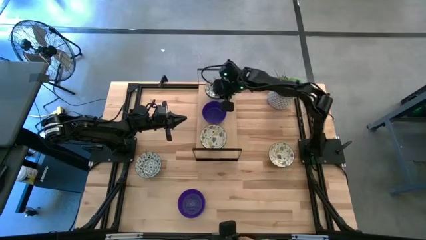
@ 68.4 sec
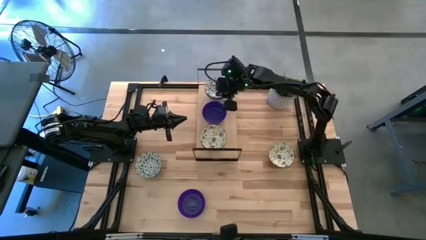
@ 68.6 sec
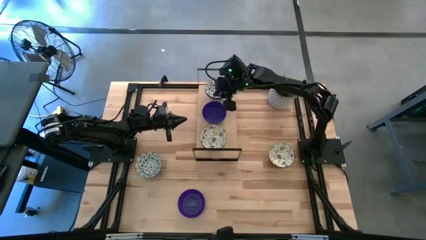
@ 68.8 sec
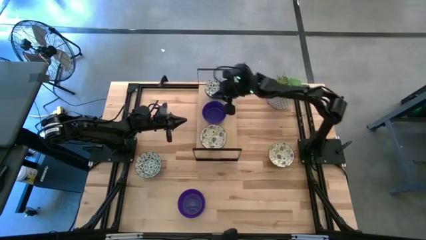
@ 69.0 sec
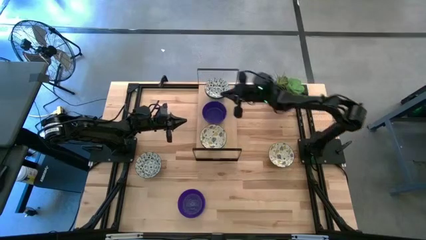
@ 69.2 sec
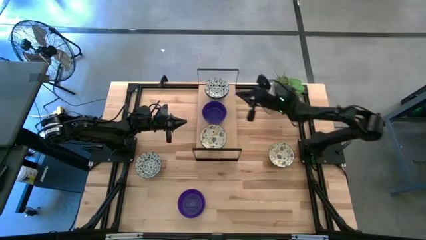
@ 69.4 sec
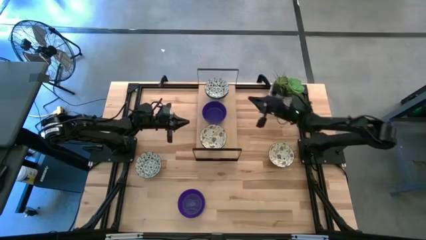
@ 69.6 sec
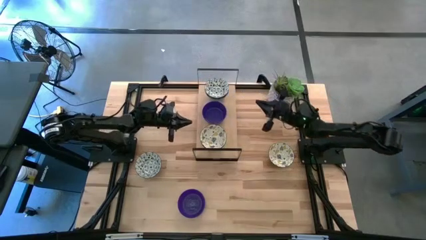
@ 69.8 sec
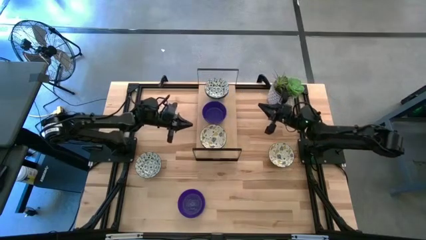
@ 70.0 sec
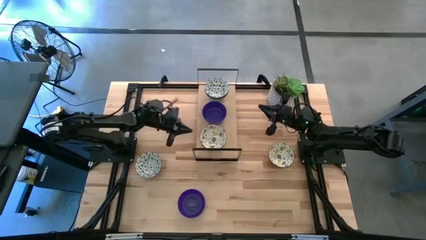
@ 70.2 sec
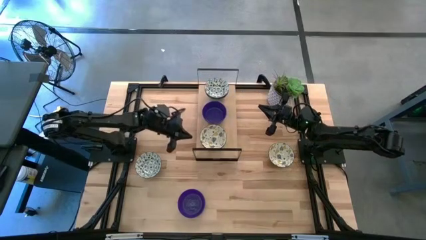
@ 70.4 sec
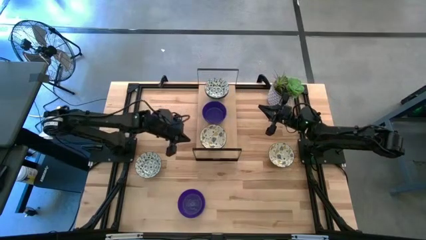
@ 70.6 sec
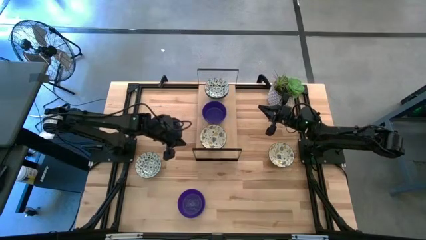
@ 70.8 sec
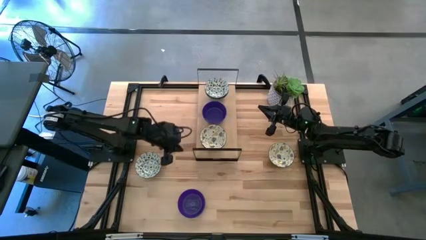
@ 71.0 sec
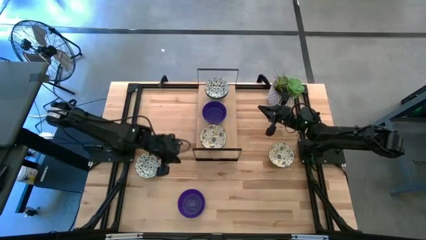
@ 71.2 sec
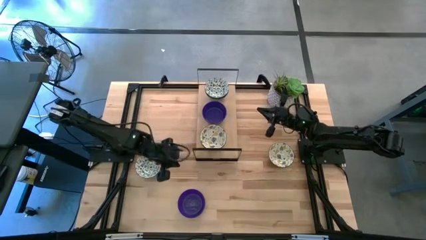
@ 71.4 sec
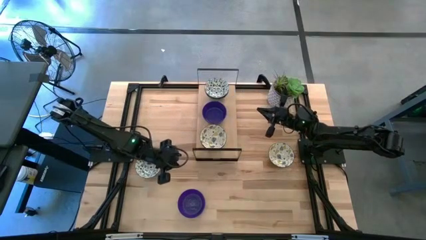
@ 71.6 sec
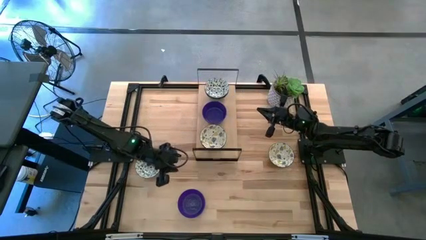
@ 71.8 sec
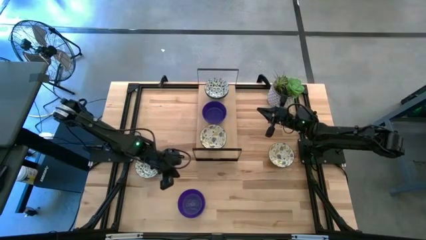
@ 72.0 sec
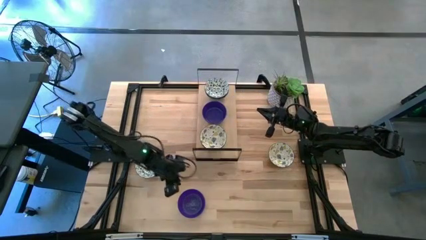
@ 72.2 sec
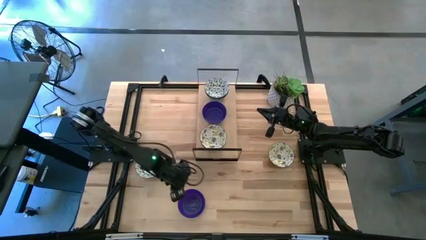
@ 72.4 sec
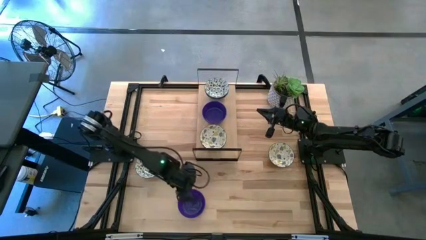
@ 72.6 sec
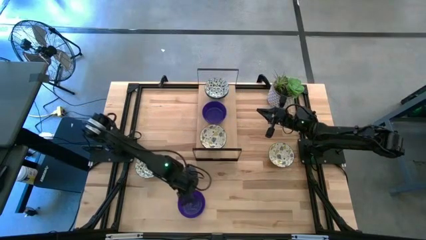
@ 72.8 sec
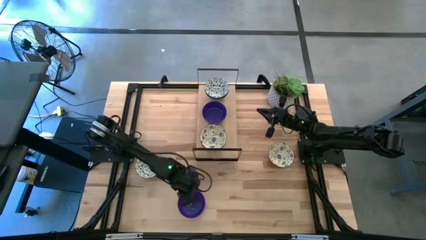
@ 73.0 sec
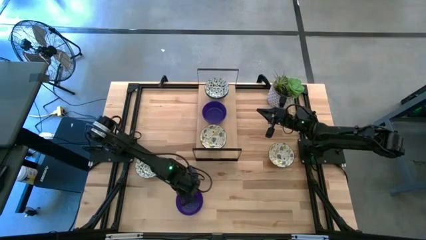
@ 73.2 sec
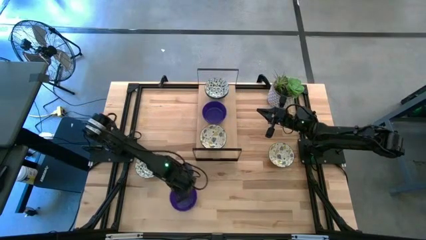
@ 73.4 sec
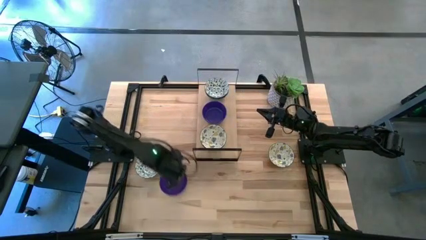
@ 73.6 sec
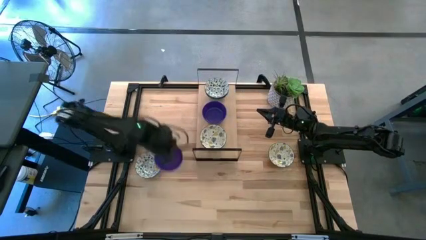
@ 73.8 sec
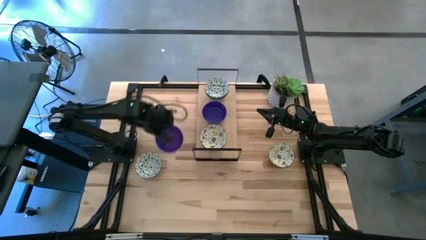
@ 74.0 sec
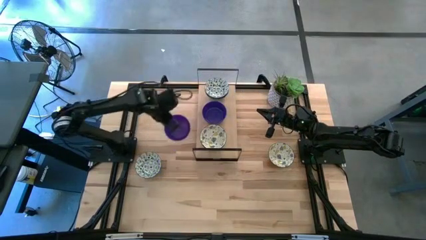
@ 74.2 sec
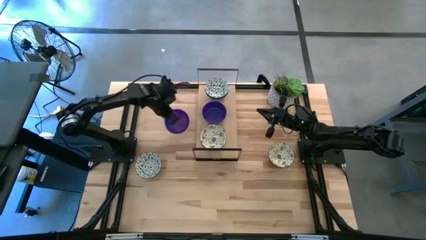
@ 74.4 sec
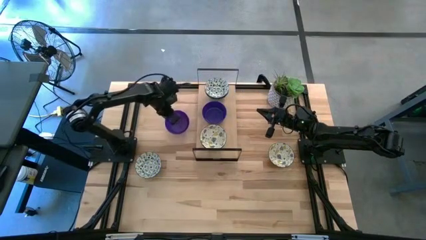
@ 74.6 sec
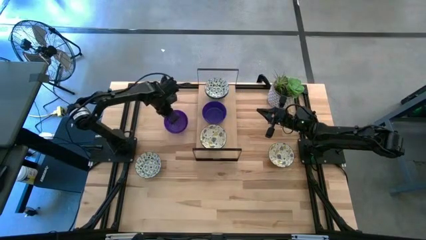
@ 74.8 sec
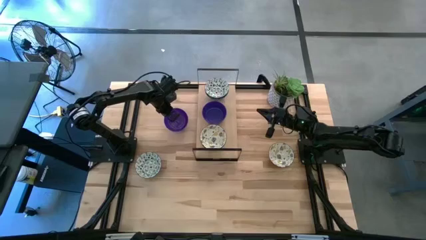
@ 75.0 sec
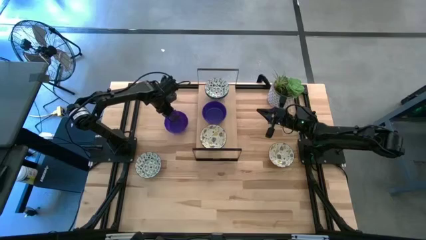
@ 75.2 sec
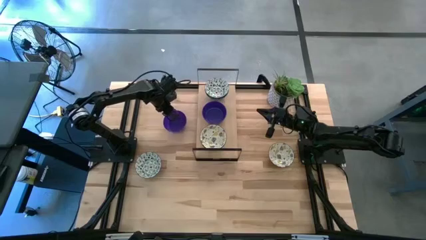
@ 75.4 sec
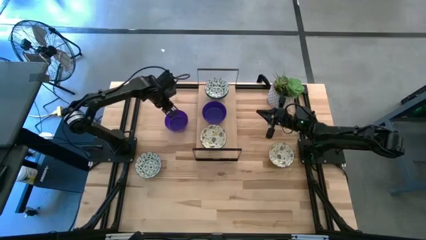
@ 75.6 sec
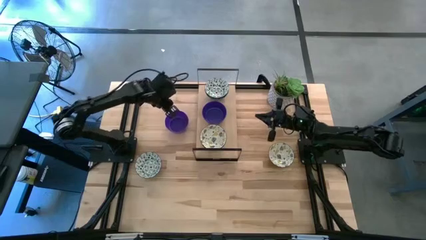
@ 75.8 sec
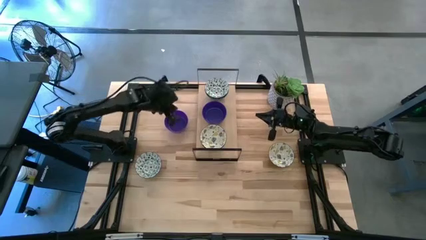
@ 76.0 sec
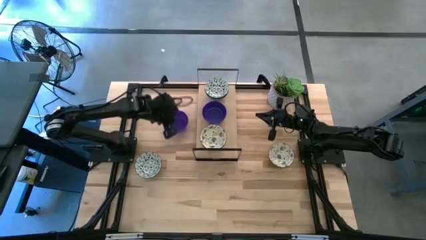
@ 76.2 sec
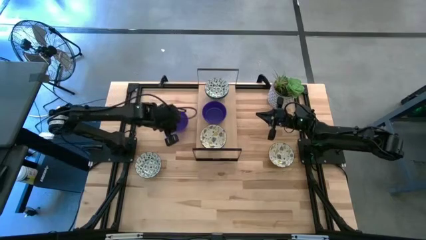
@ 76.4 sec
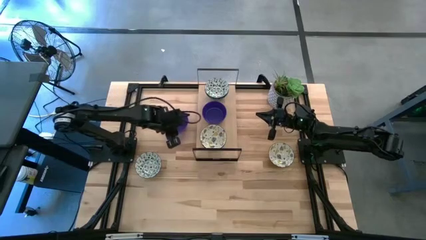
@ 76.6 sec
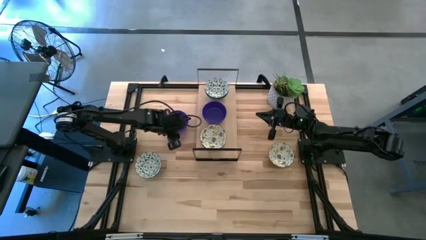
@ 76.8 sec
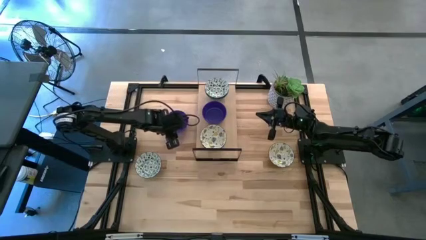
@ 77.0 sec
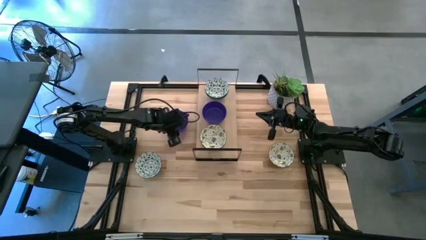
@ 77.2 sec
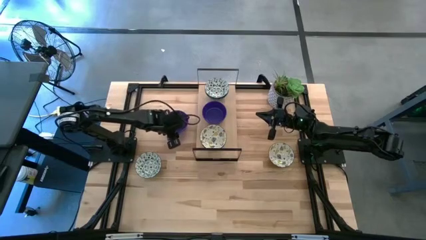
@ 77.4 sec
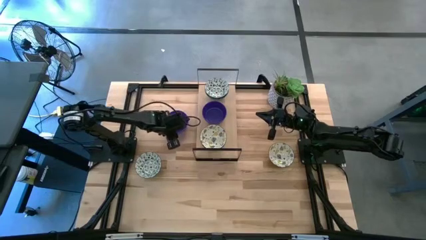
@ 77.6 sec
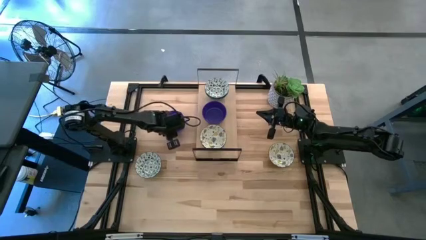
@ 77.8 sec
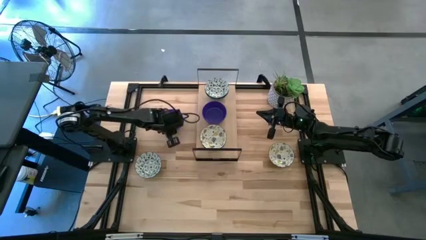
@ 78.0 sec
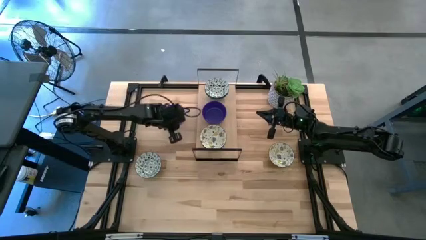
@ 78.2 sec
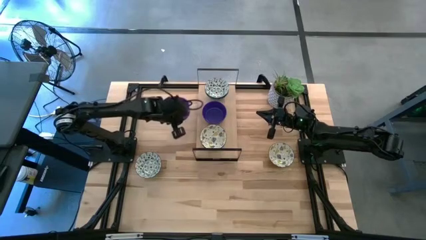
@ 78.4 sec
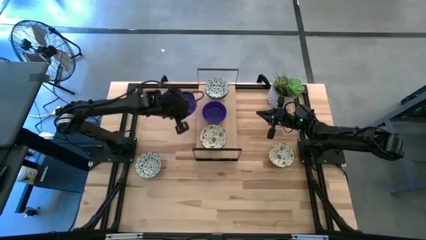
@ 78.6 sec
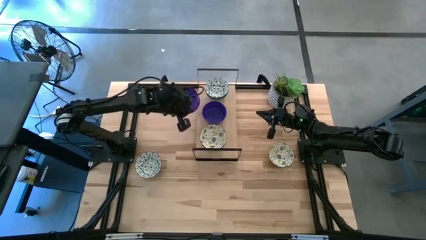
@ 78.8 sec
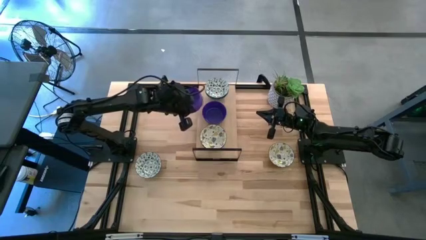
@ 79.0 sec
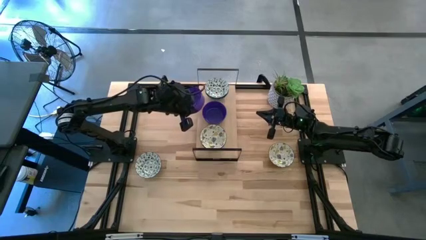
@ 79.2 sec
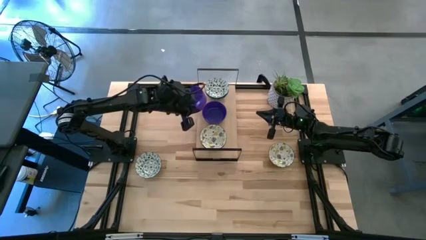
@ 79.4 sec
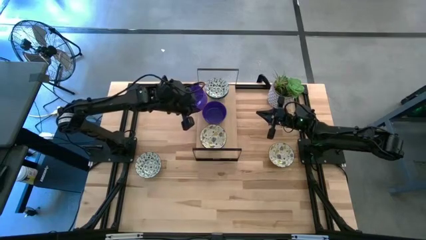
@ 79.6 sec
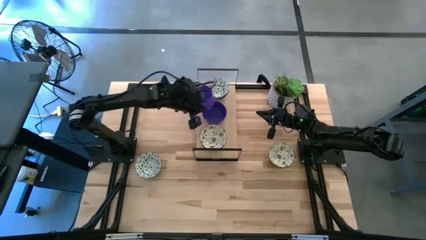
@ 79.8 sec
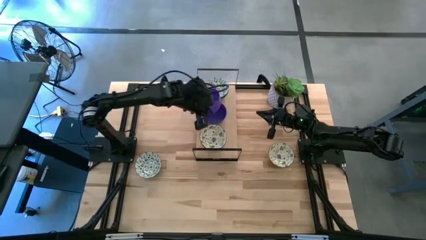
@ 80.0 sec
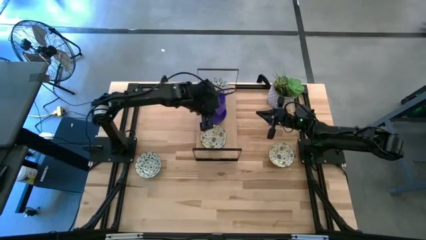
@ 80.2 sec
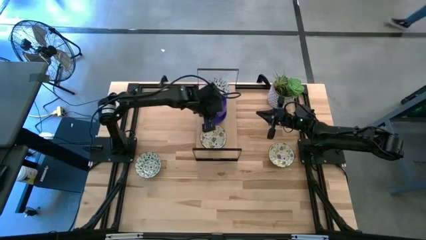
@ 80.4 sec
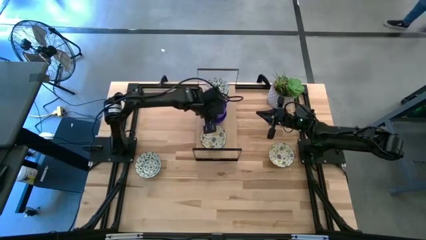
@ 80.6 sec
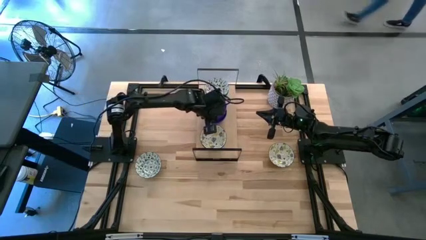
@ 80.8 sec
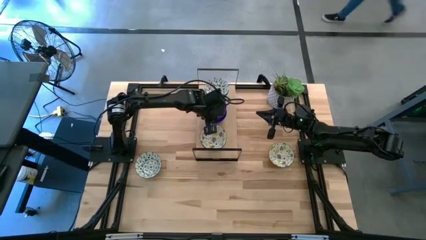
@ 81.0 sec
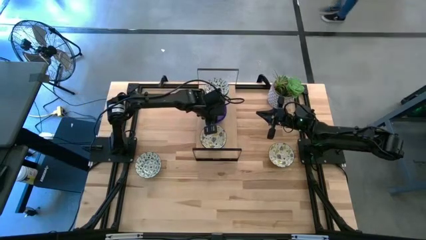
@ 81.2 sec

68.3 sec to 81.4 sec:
Task: Pick & Place Mini bowls
Stack the violet bowl on top of the stacked violet bowl on the shelf

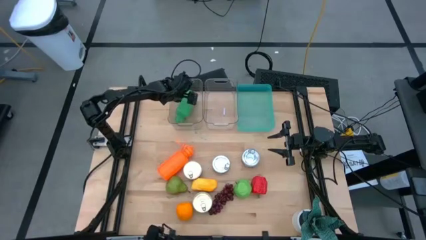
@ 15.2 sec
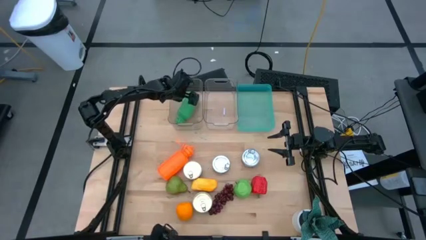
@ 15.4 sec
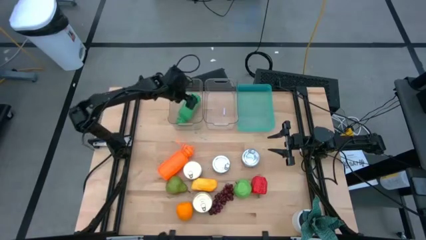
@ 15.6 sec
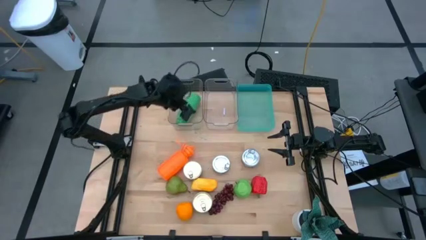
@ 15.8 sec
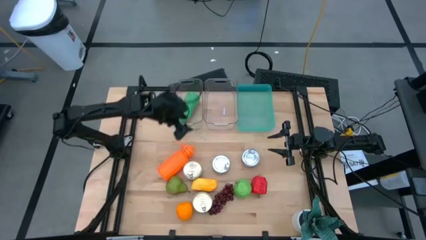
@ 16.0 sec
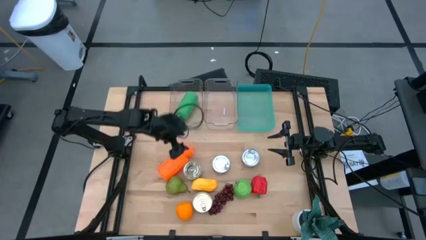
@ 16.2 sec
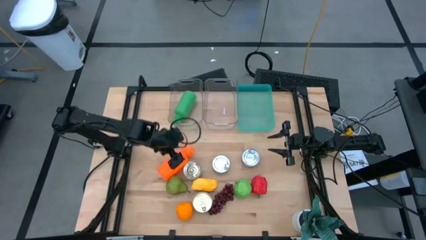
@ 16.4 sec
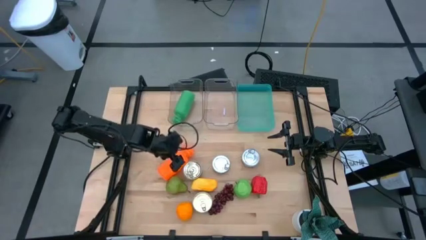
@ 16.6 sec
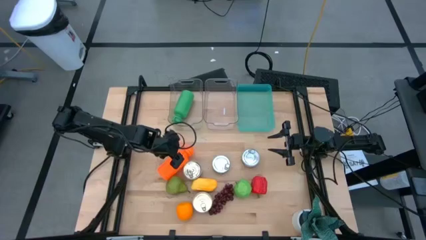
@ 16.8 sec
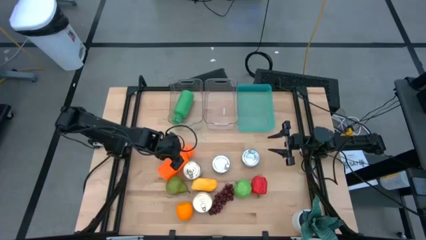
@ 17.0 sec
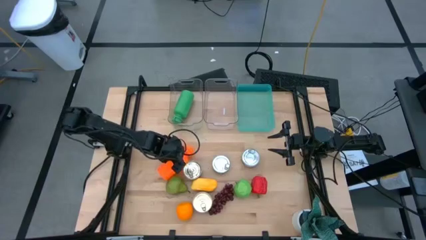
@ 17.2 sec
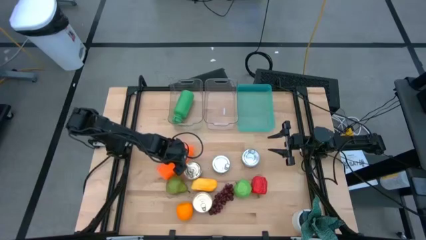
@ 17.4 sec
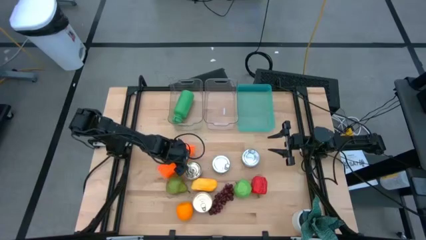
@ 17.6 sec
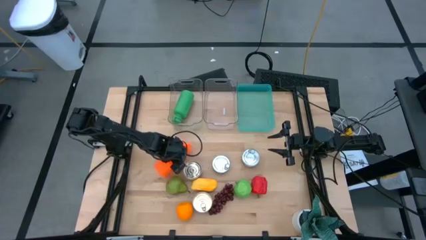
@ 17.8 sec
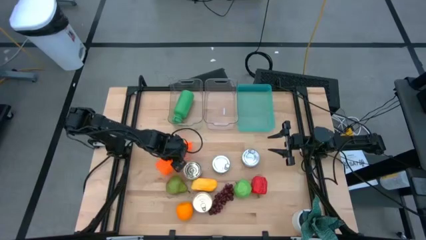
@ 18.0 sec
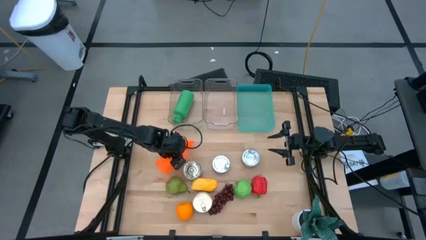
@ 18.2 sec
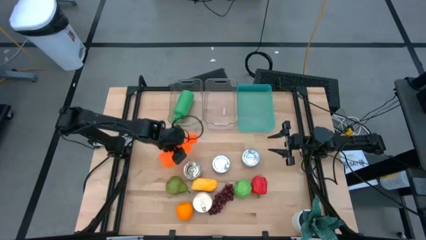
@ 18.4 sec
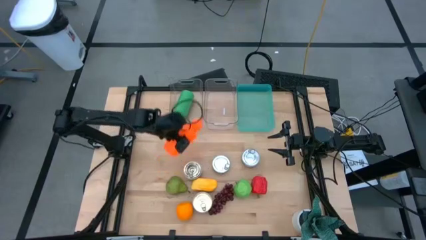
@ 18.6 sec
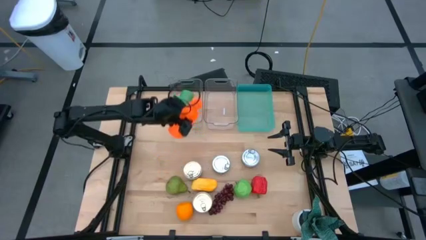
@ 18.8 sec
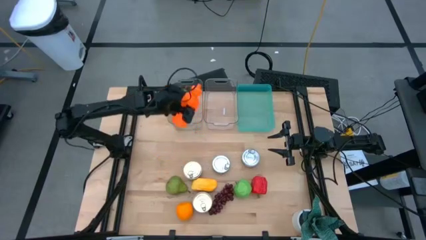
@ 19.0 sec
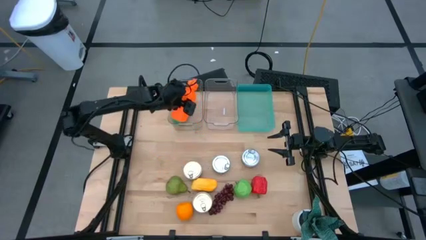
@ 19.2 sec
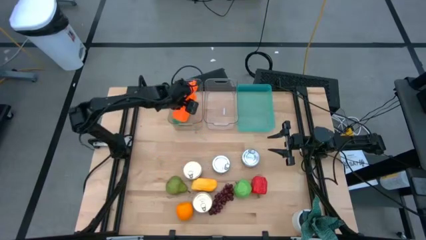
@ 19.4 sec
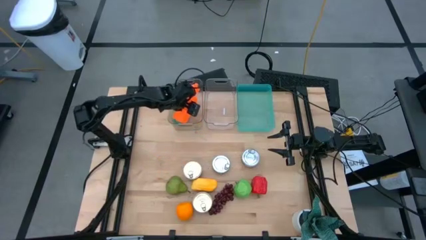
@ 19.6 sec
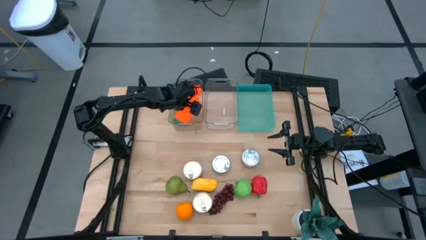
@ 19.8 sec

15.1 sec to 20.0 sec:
Task: Pick & Place Food Item
Put the orange water bottle into the left transparent bin
